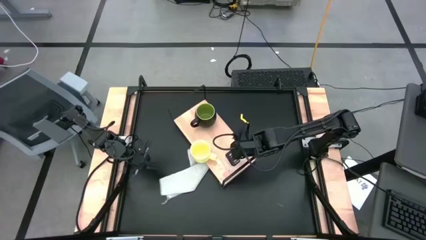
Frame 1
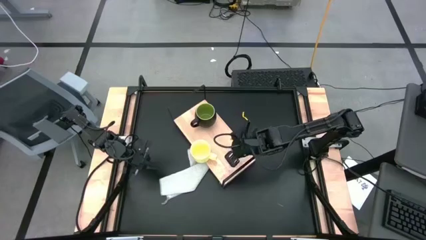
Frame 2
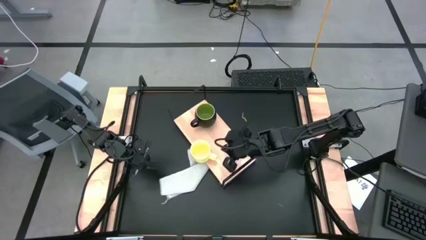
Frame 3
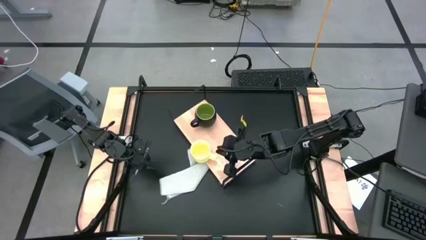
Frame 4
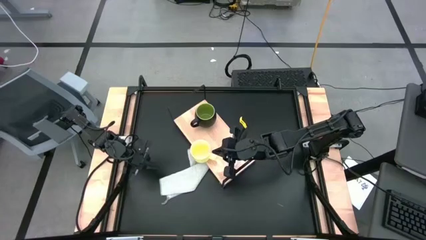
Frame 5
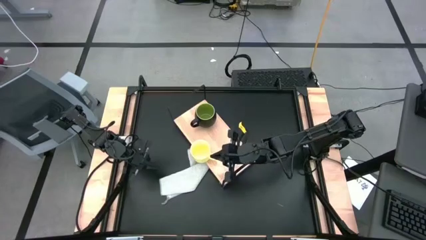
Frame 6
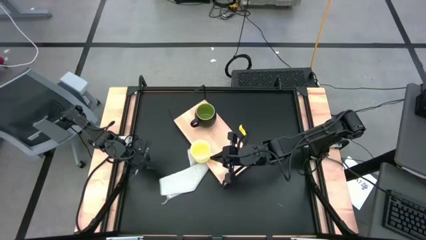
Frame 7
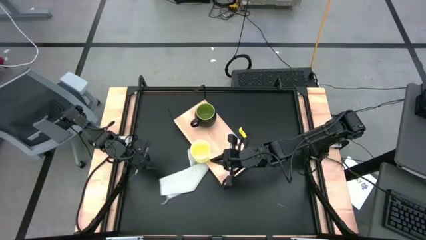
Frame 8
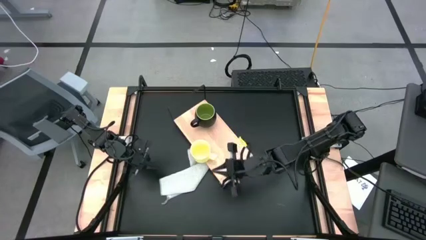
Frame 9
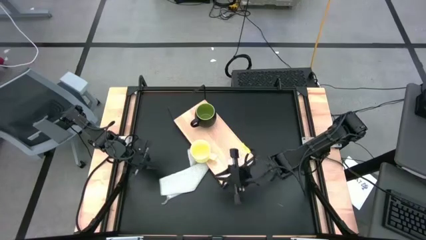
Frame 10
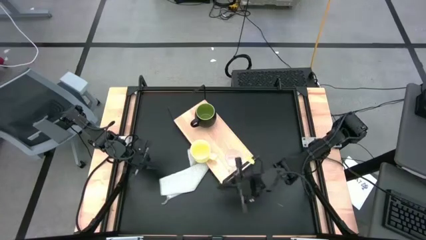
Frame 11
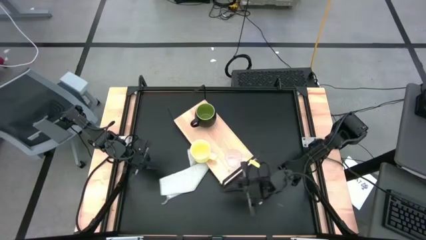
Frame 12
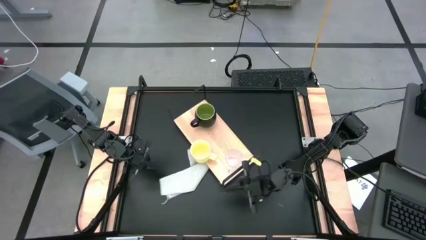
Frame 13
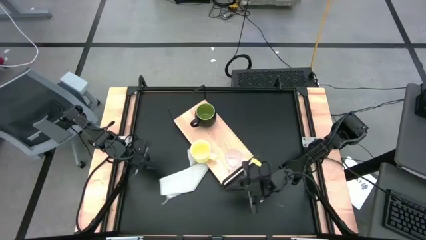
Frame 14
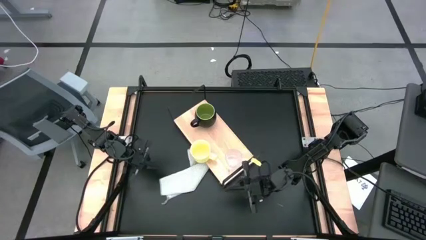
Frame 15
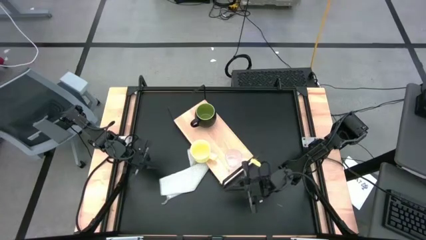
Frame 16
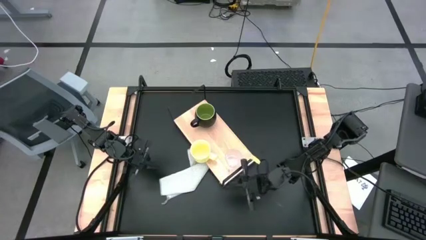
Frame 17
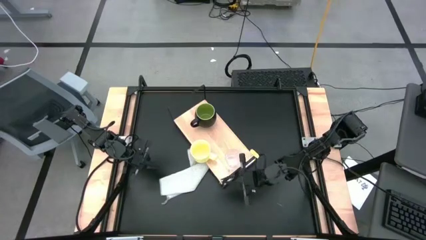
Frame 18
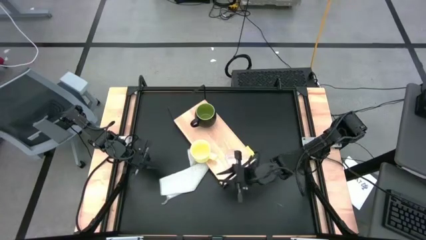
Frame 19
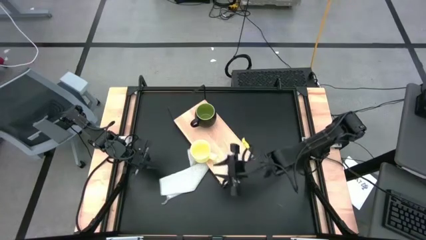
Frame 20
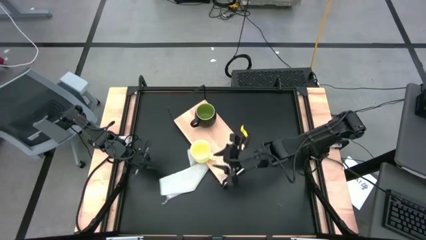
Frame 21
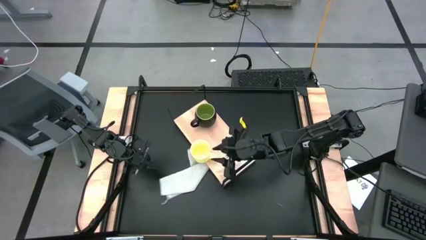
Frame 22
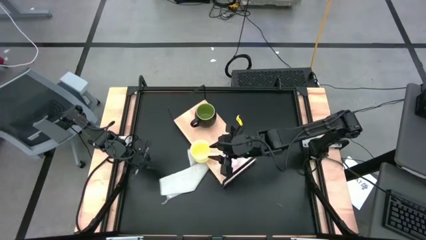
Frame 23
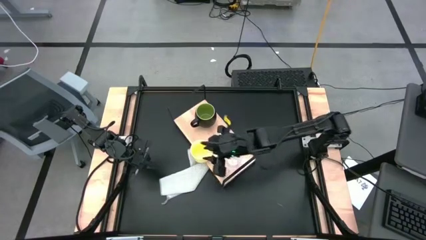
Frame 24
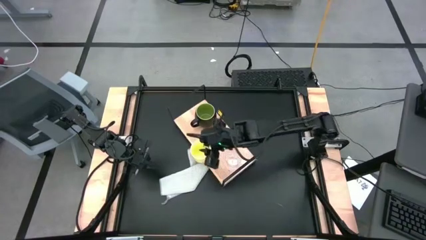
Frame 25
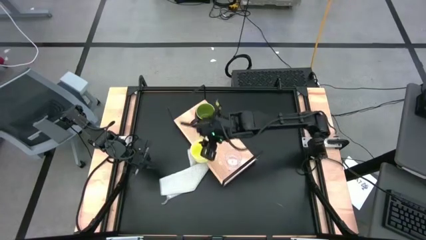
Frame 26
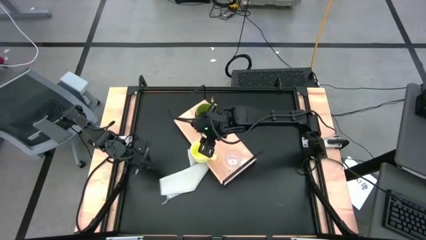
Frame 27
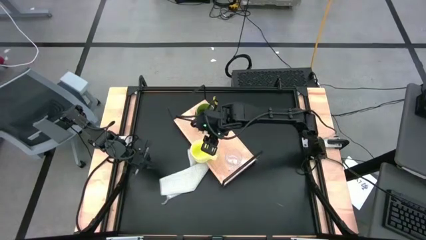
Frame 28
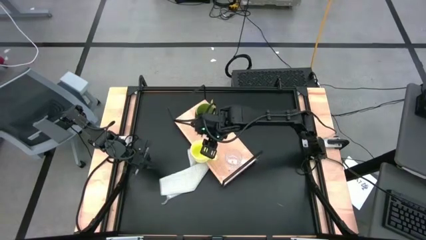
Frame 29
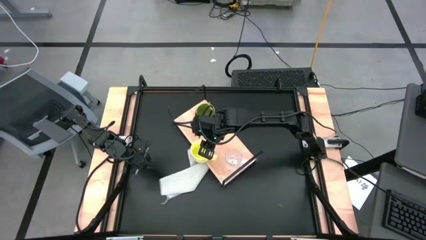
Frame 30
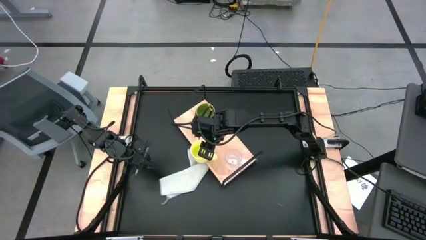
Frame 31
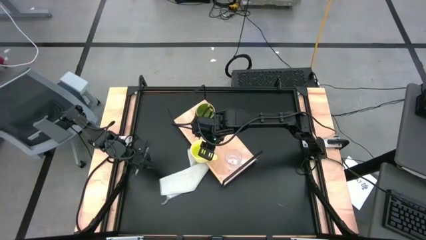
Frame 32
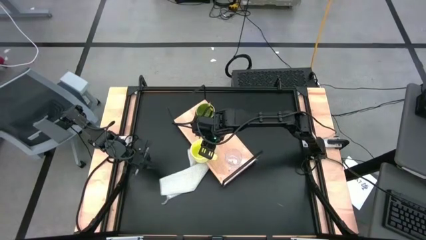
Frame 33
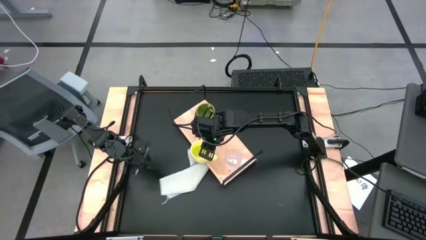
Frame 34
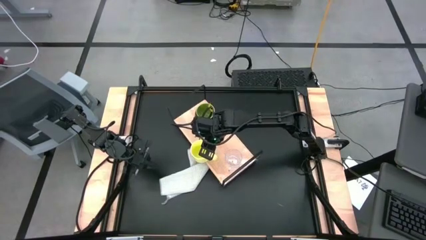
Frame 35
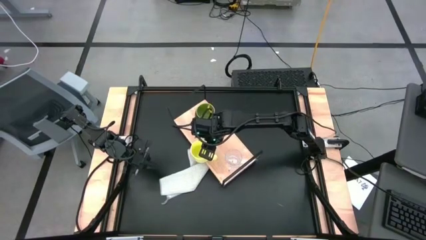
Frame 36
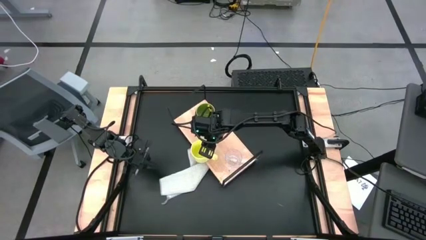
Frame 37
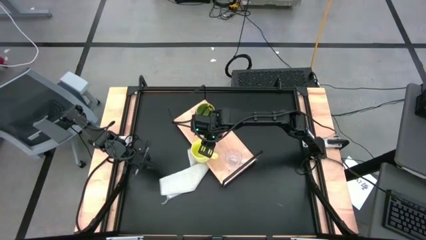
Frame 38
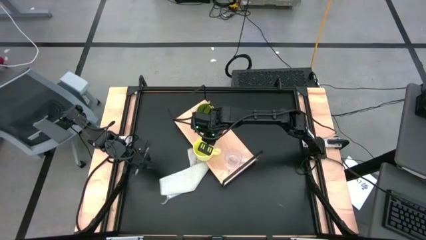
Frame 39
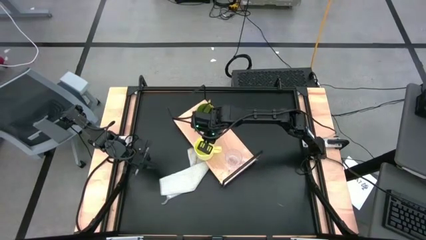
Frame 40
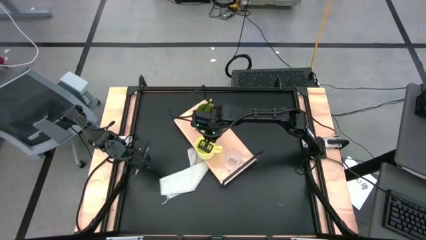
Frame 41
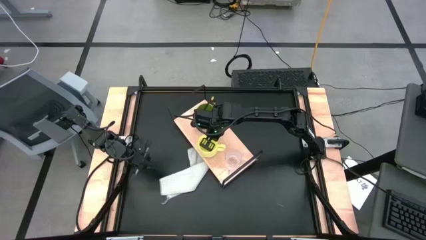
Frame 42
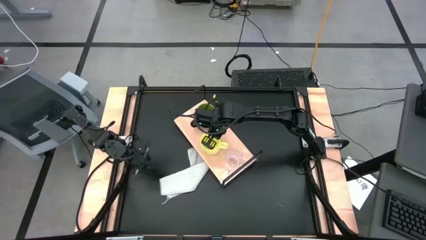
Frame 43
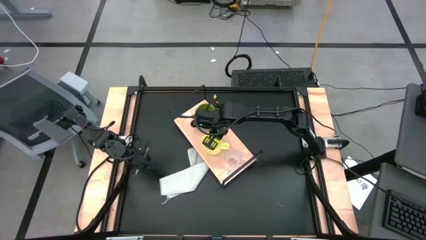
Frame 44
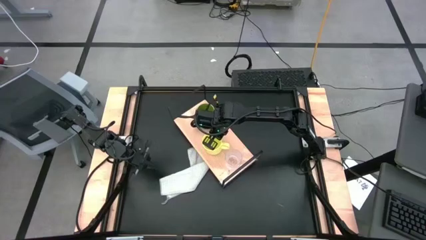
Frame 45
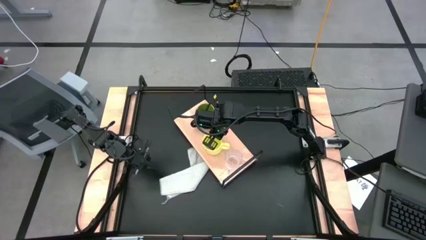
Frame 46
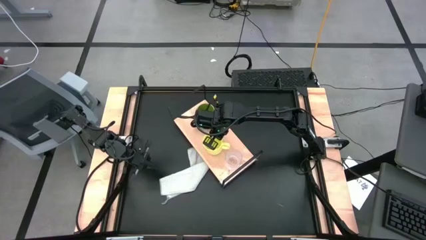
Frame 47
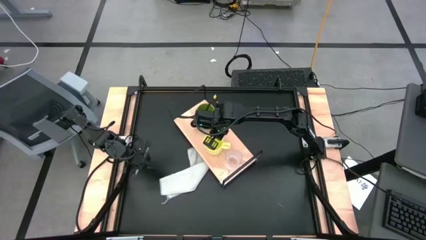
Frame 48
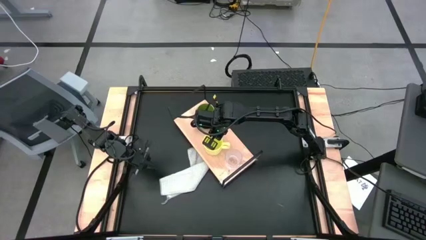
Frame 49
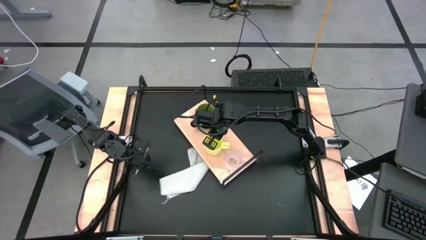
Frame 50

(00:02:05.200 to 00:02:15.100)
Task: Stack small to large cups/mugs on shelf
Adjust all the mugs

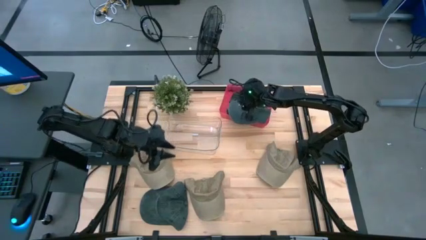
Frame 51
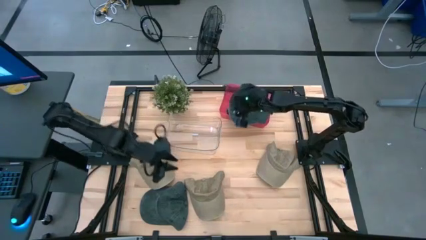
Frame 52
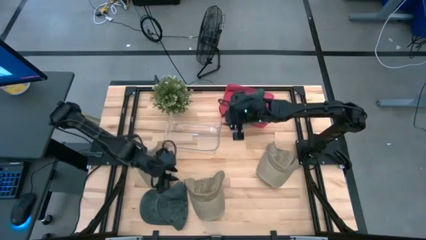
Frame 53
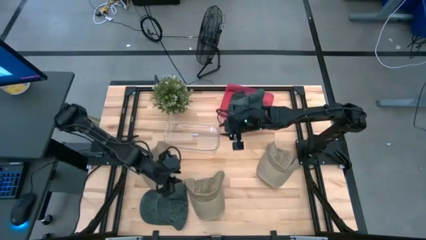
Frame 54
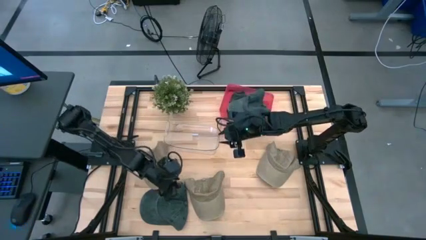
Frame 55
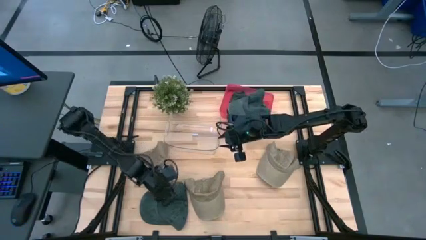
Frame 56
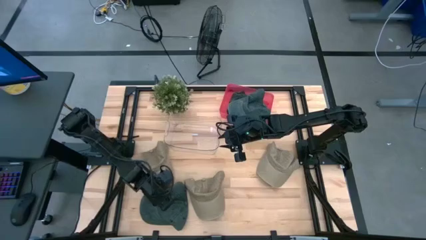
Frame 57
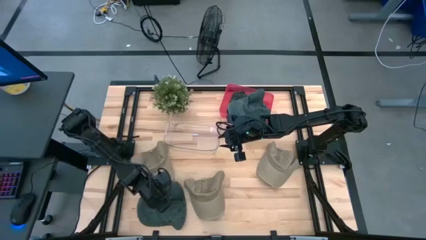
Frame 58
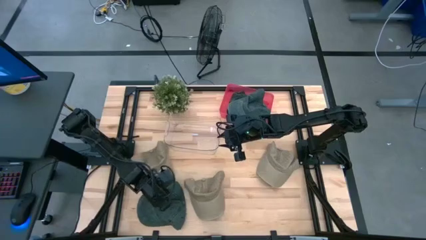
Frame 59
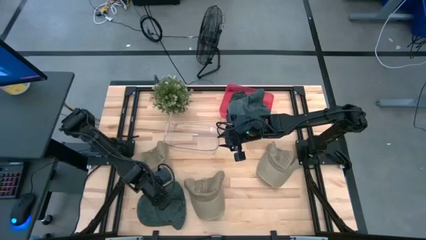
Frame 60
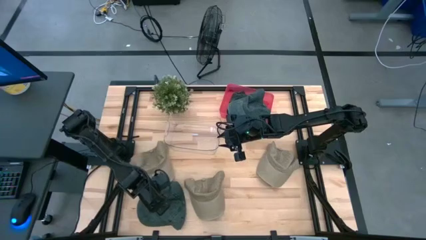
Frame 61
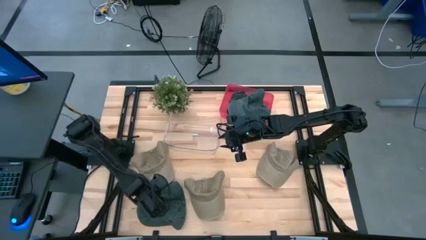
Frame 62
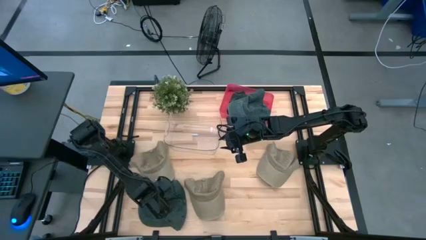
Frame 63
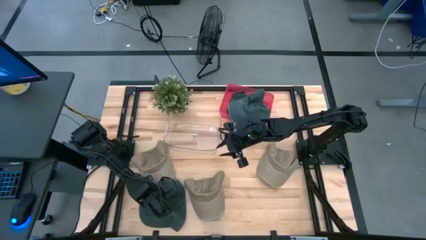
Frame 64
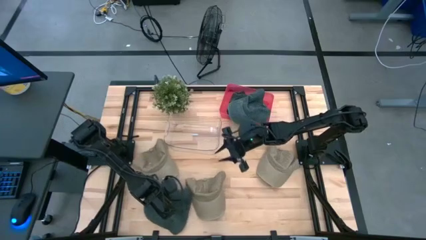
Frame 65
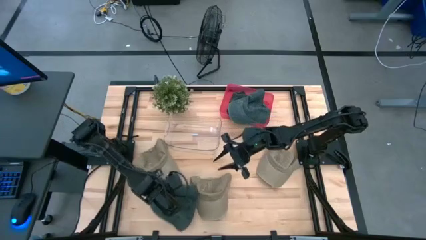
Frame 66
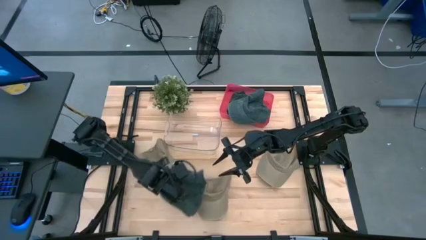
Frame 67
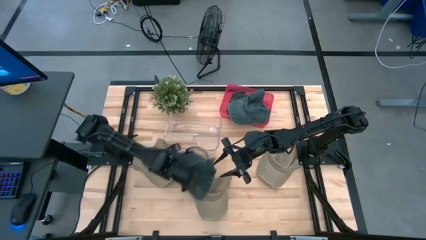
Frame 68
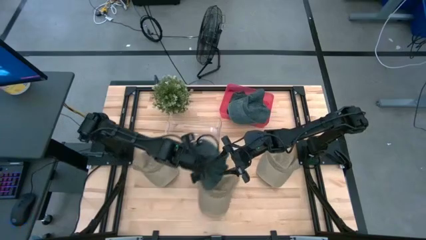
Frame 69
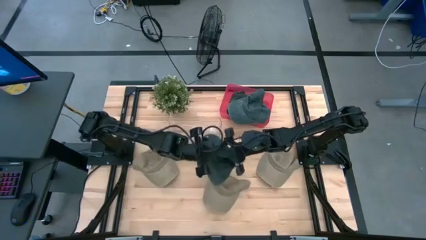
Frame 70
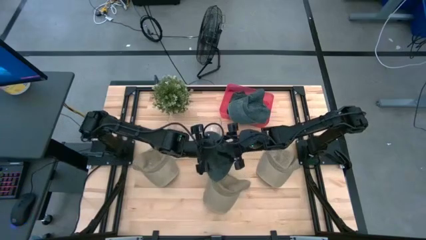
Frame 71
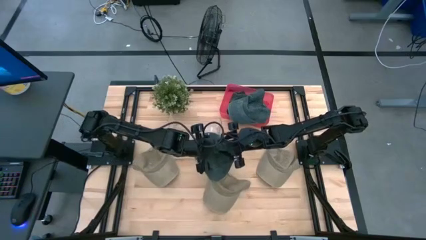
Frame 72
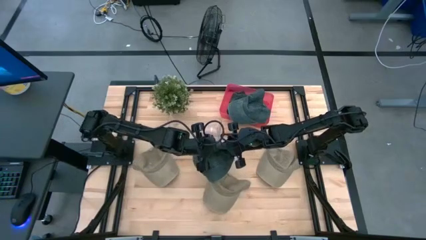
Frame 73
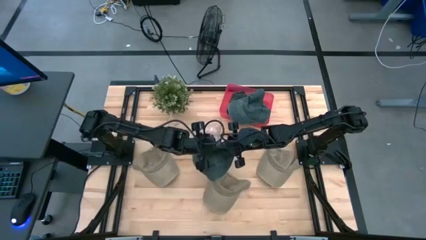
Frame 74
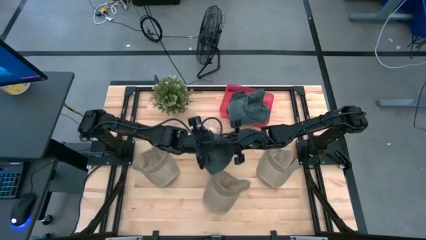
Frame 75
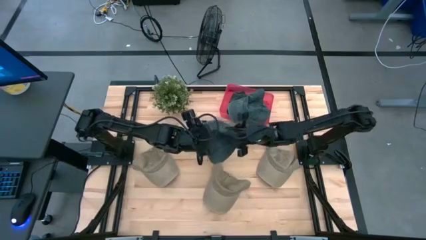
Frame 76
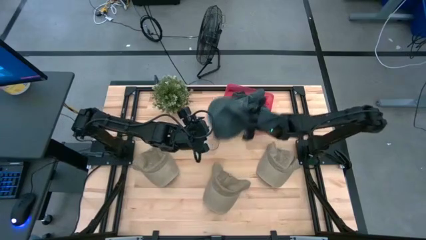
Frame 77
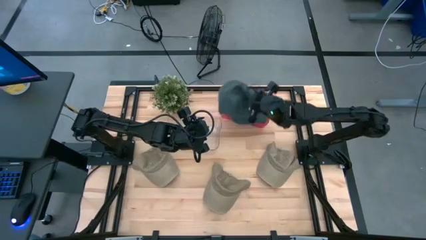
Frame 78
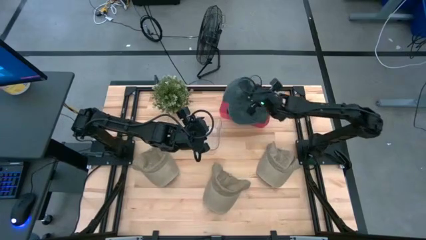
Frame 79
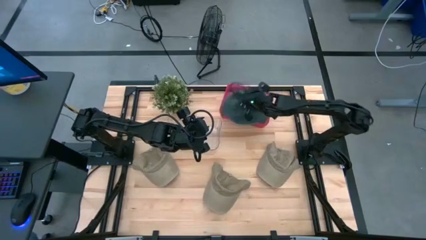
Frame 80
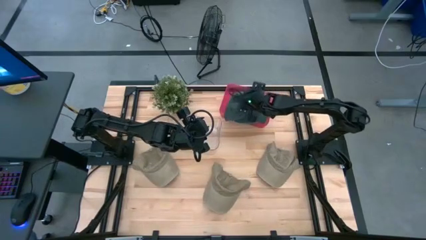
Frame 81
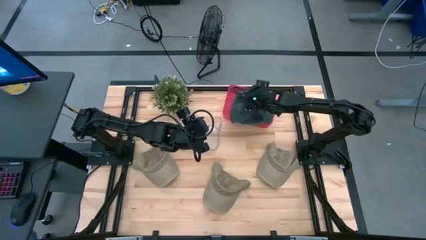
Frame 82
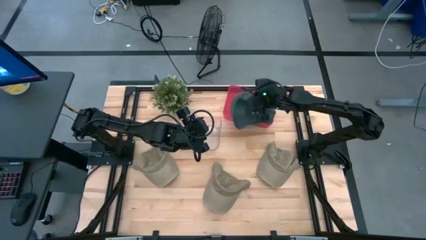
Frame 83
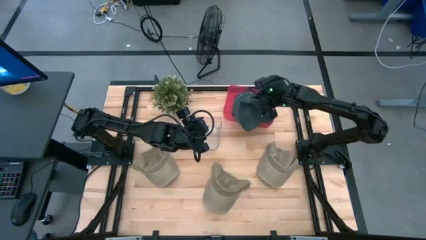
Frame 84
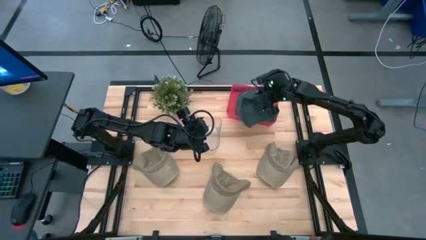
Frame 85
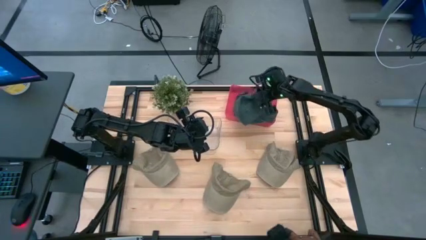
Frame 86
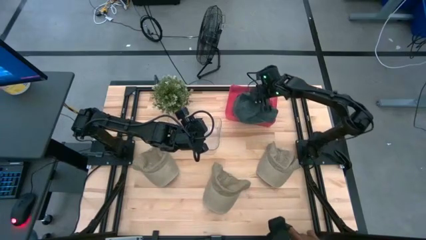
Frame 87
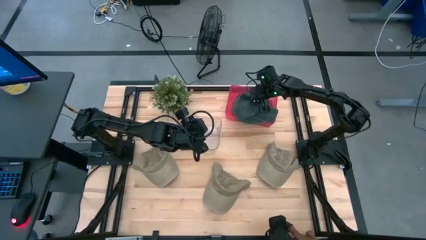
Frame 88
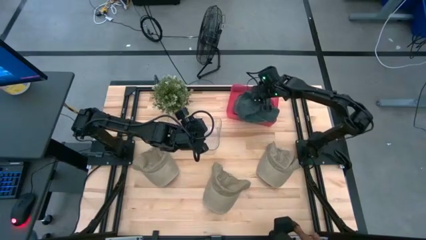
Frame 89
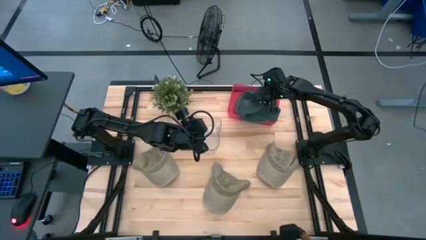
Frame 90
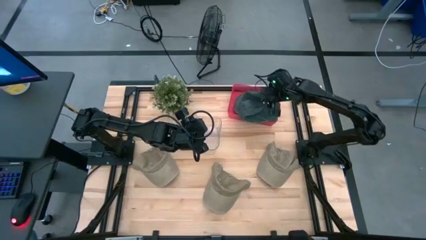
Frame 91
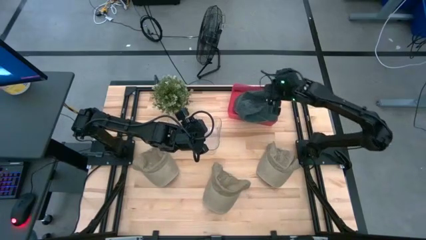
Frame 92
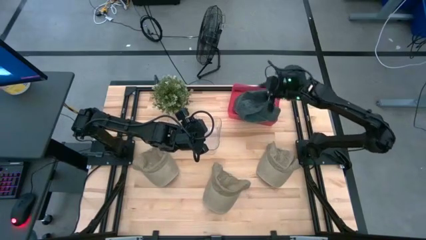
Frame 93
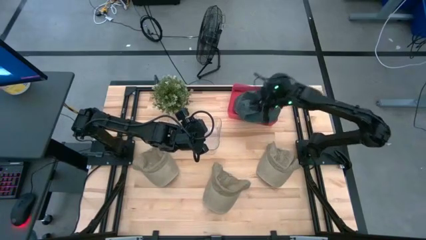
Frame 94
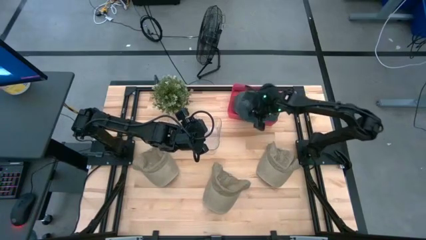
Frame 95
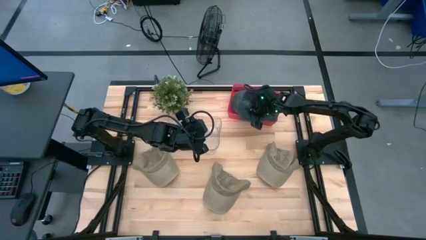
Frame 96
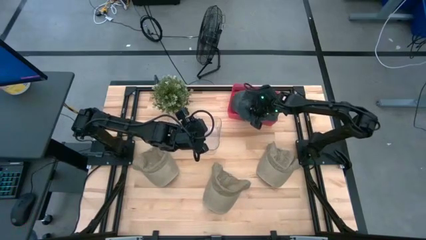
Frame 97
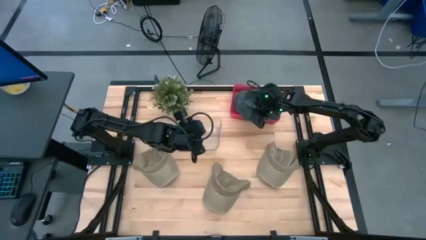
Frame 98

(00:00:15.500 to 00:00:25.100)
Task: Pick & Place hat
Put the black cap into the red bin
